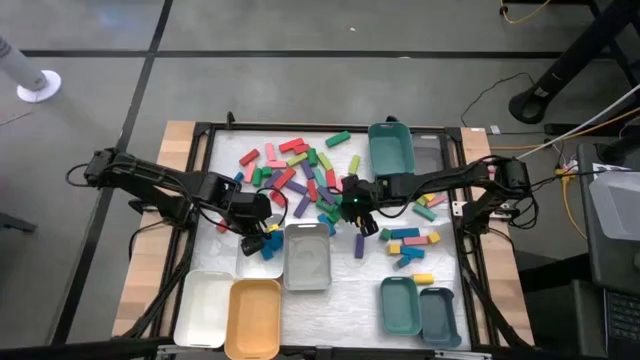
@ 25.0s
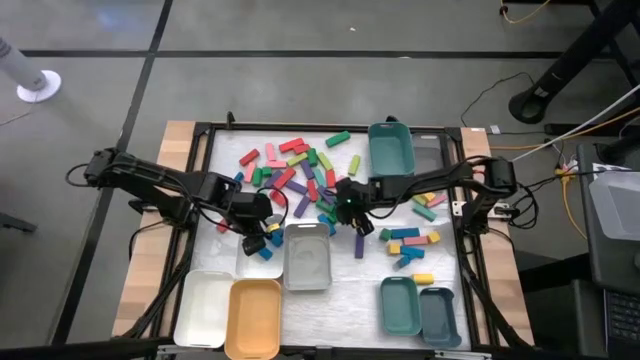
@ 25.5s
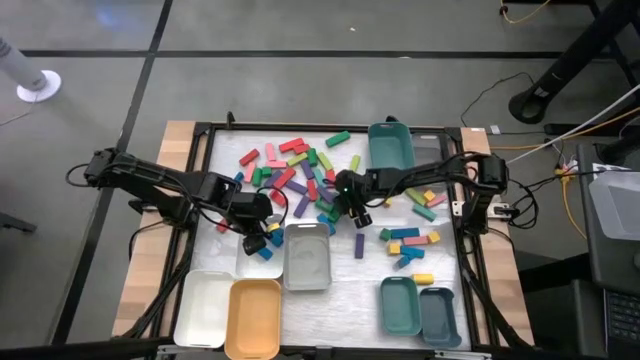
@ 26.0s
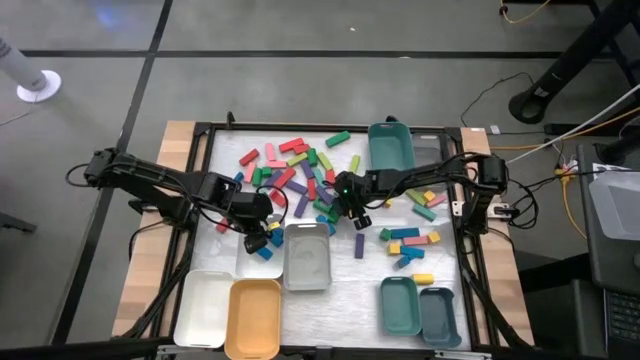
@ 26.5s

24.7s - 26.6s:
Task: Sort blocks
Put the green block into the top green bin

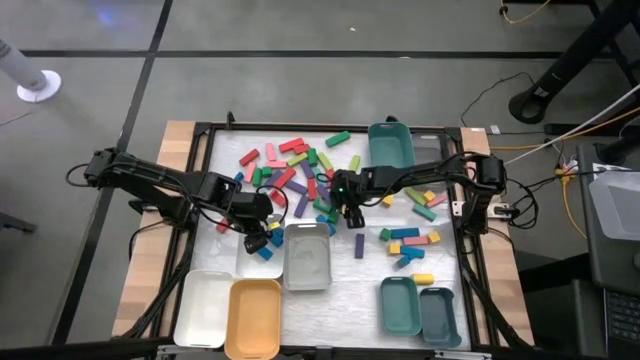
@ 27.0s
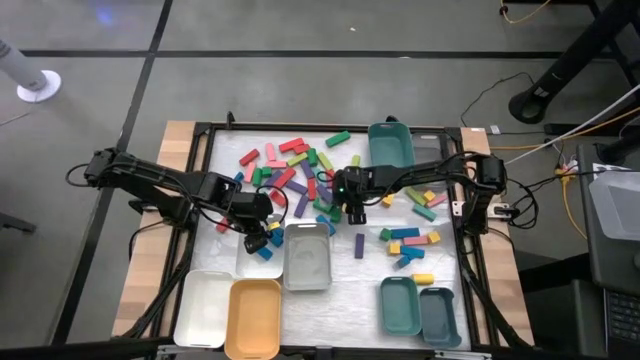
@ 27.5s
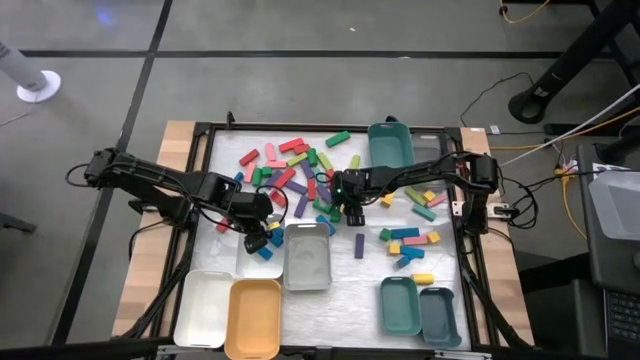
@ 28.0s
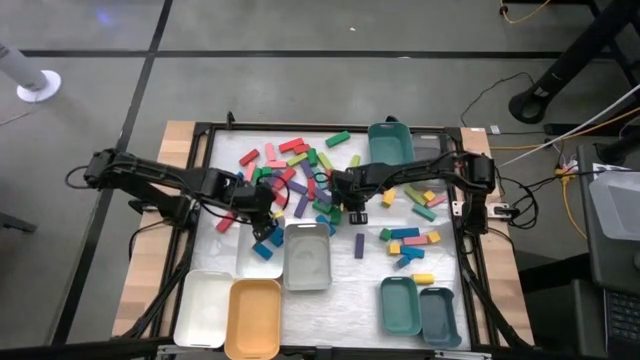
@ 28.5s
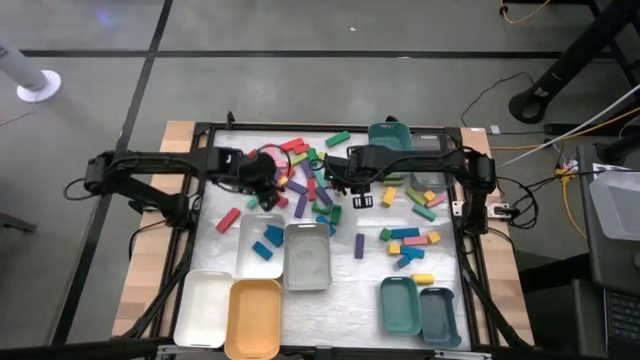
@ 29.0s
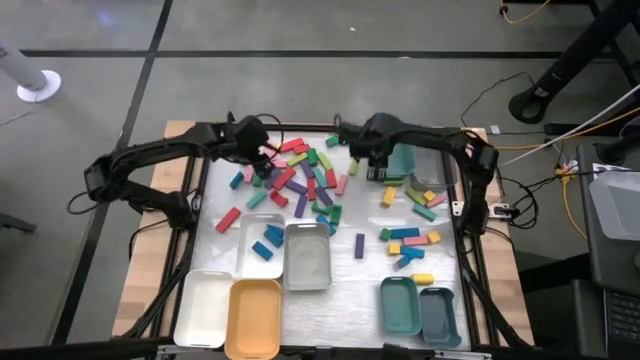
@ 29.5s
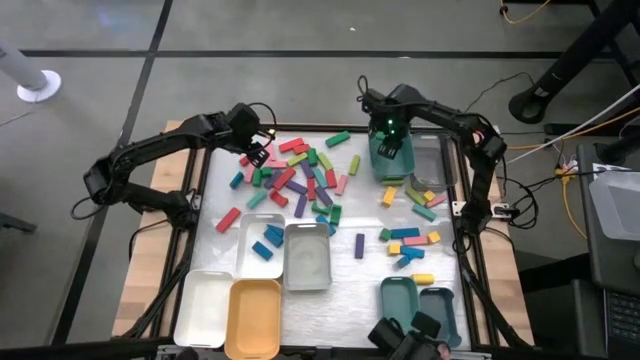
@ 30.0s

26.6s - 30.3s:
Put the green block into the top green bin

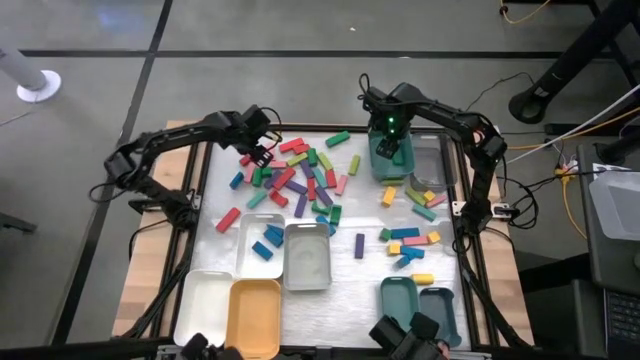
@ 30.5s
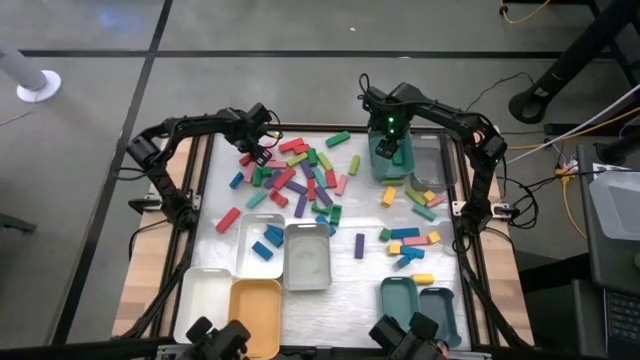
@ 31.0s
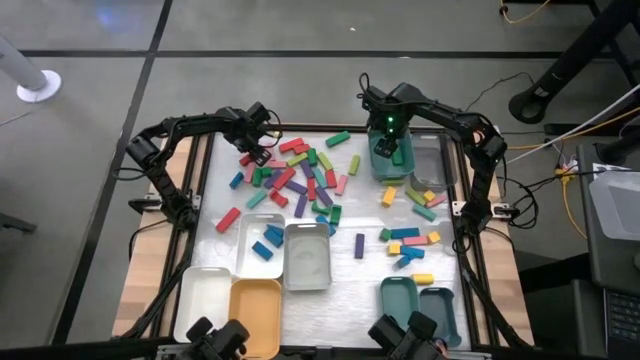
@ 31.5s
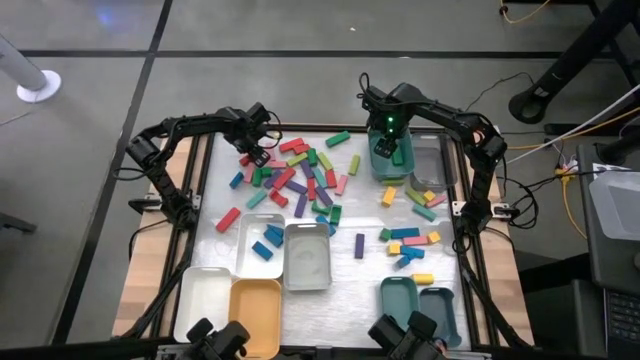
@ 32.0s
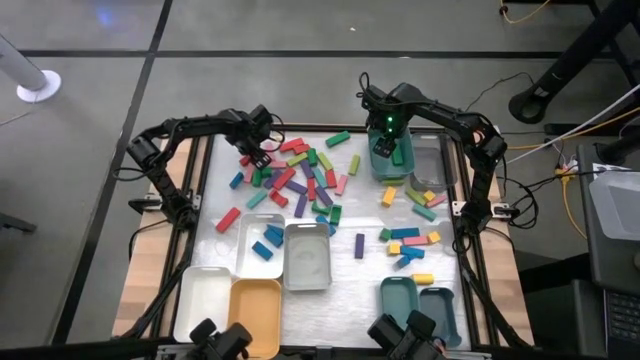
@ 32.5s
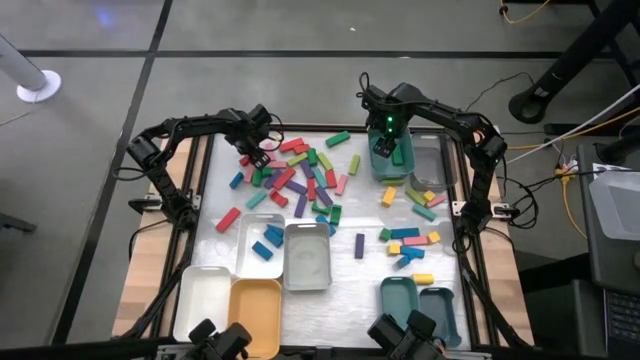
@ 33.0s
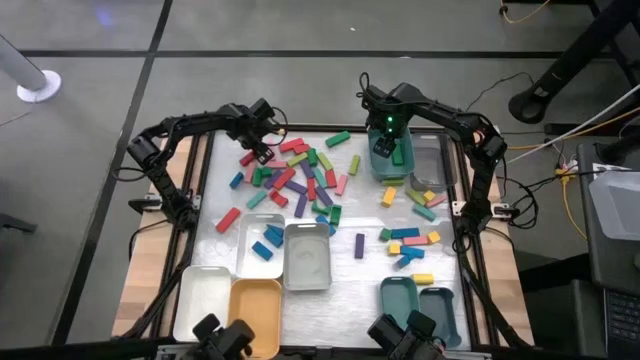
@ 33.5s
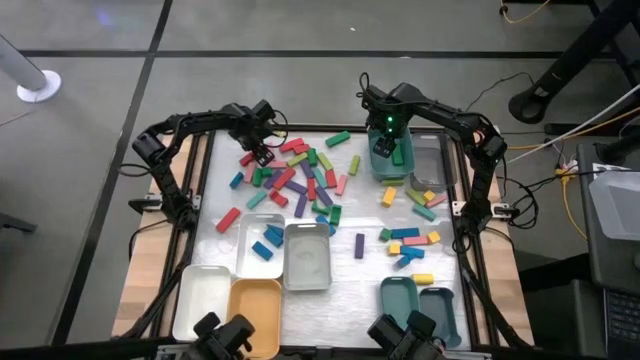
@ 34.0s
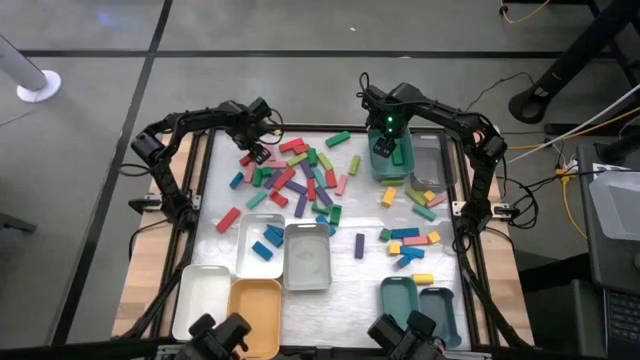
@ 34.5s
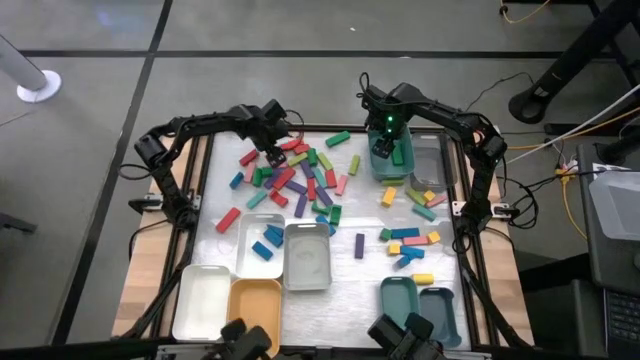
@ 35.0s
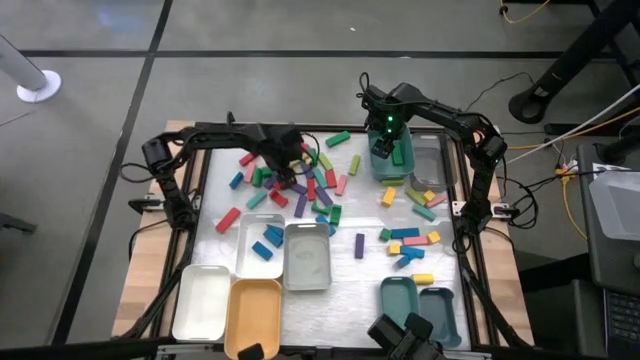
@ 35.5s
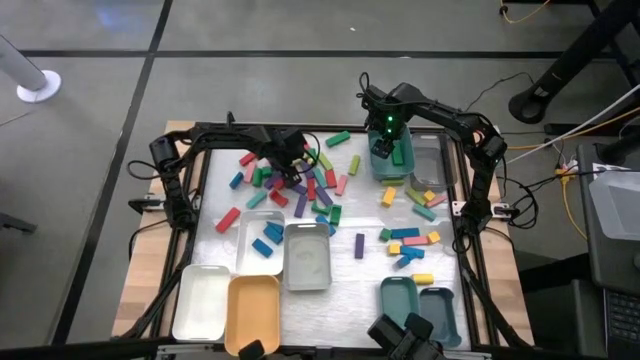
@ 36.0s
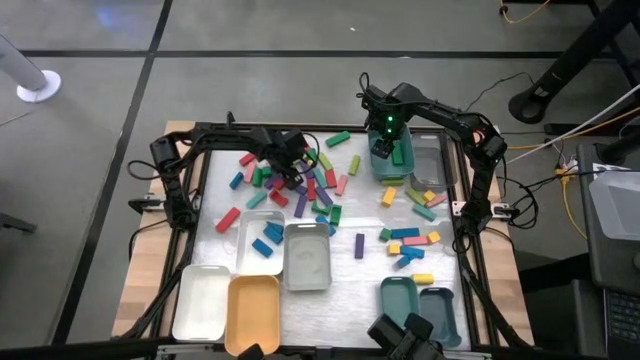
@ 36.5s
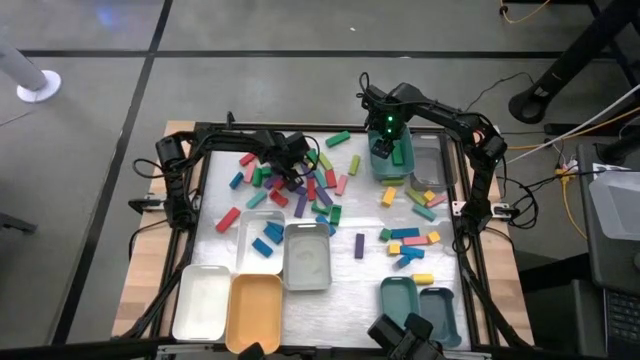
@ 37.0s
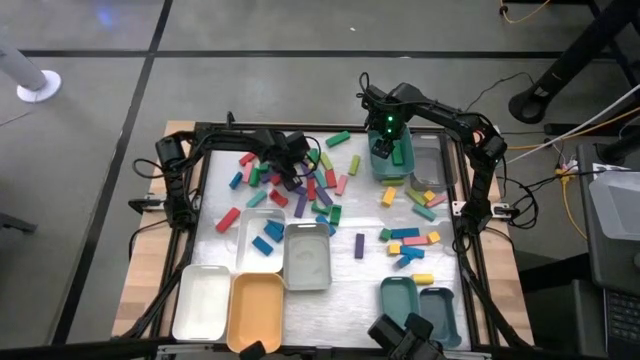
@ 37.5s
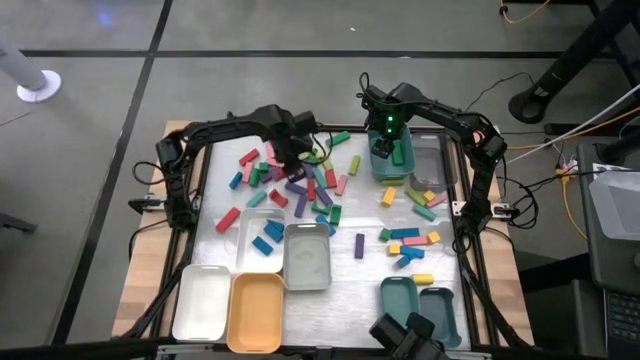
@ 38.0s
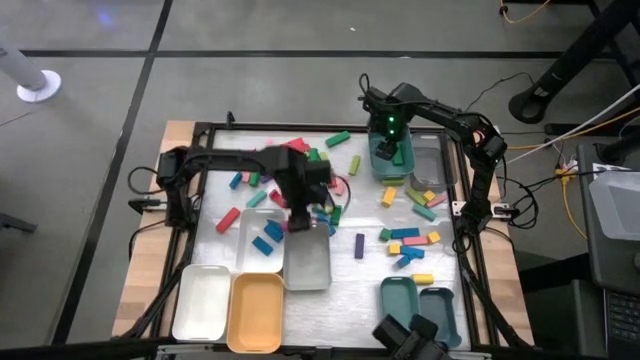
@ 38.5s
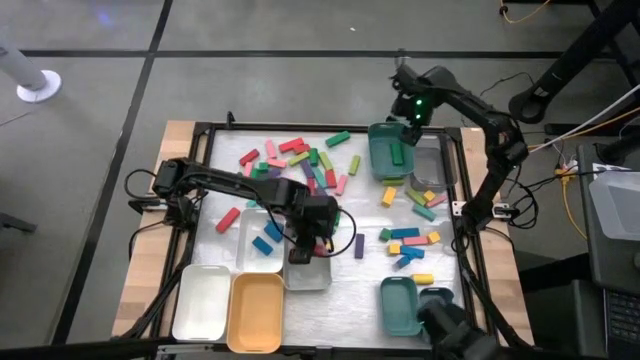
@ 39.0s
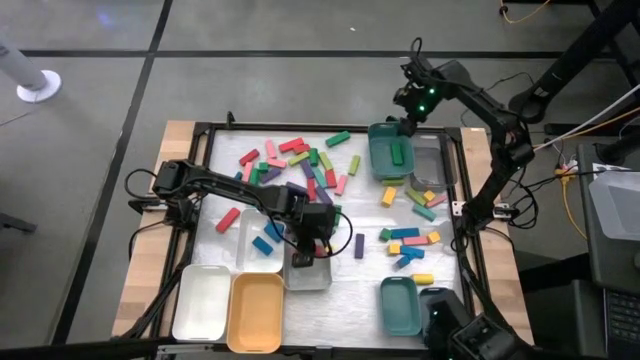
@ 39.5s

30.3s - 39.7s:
Put the red block into the gray bin

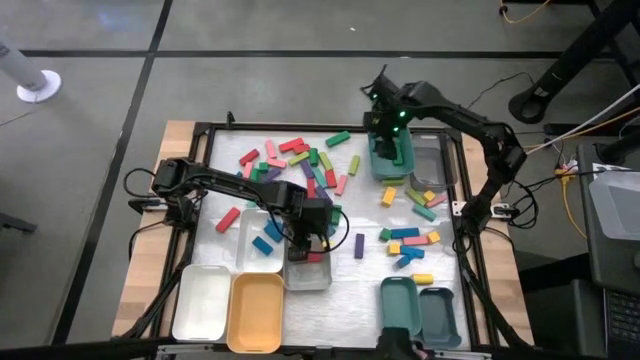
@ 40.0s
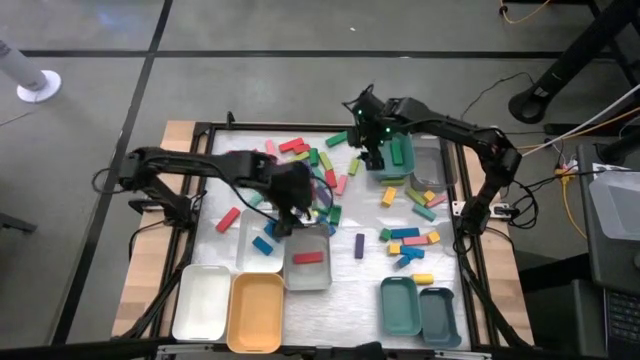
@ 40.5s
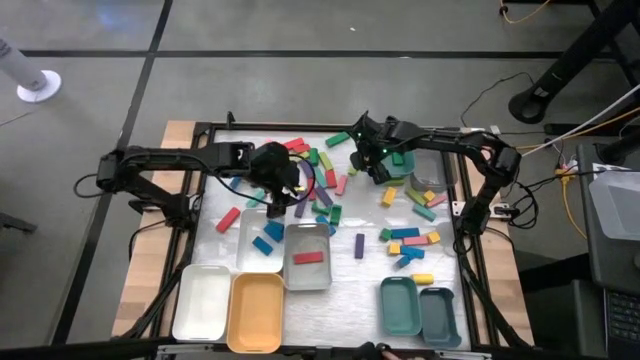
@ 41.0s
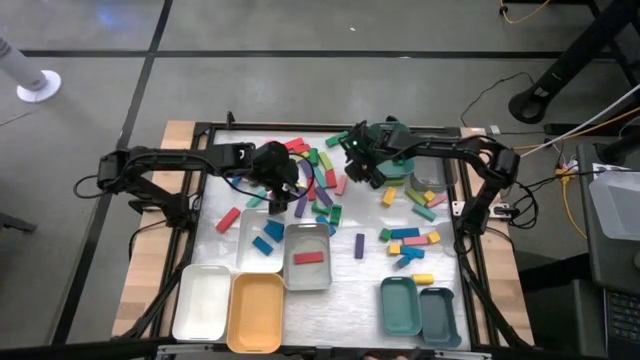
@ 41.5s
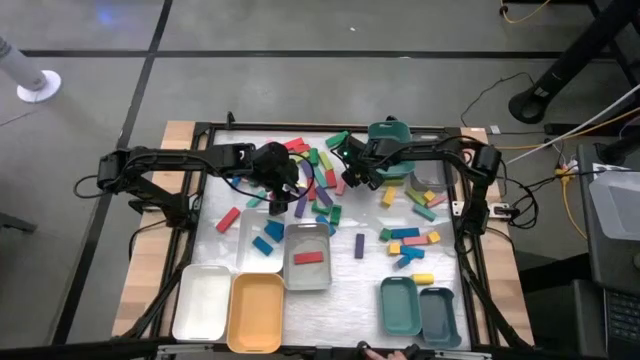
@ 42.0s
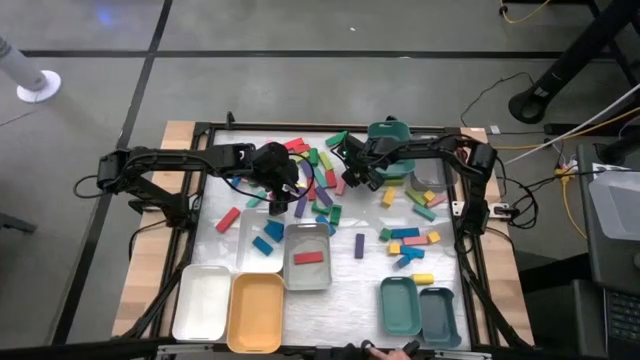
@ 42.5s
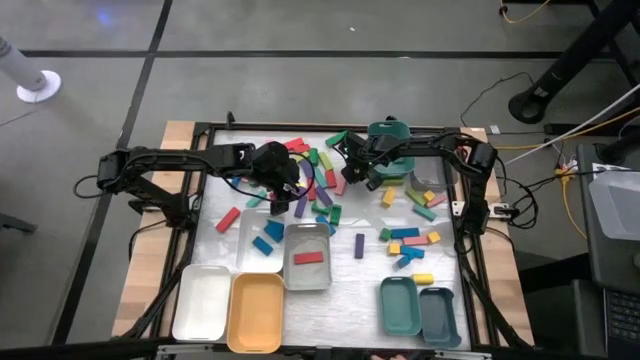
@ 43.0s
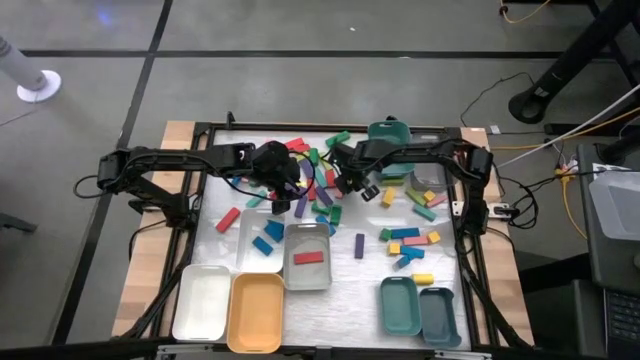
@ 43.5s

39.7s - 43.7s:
Put the light green block into the black bin

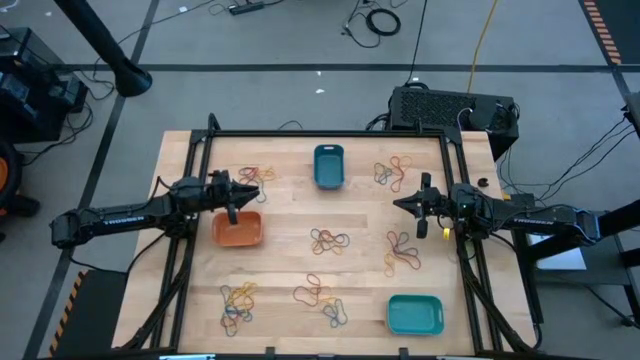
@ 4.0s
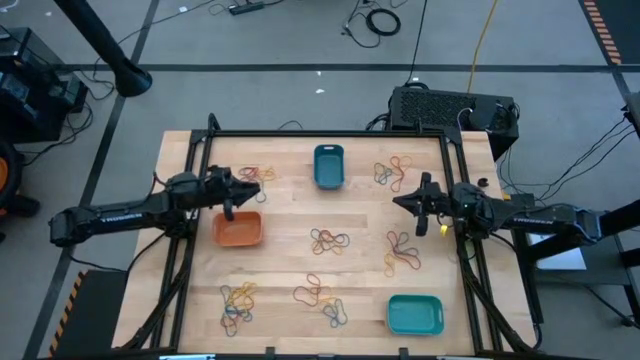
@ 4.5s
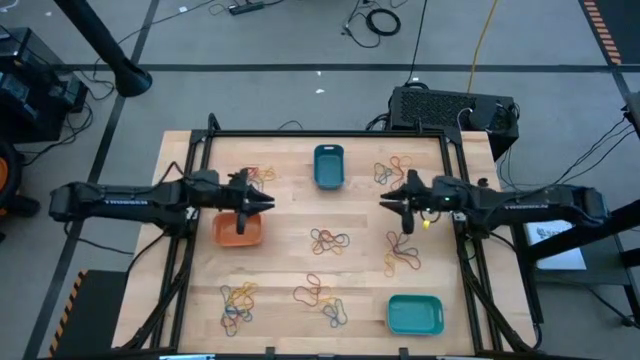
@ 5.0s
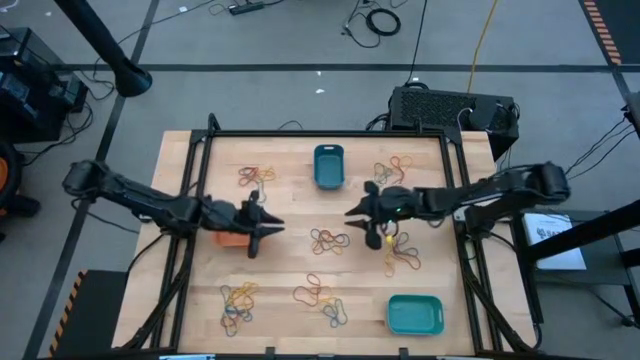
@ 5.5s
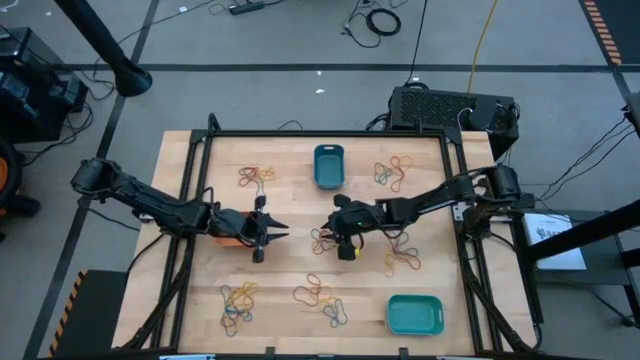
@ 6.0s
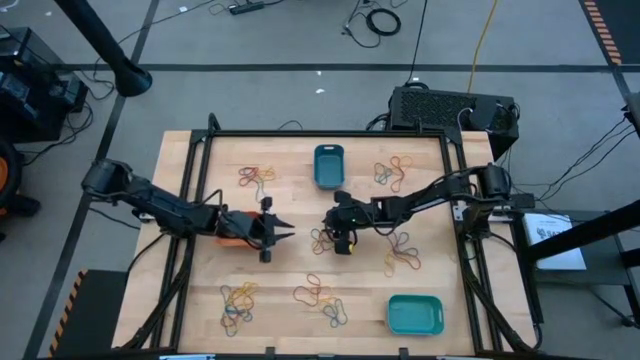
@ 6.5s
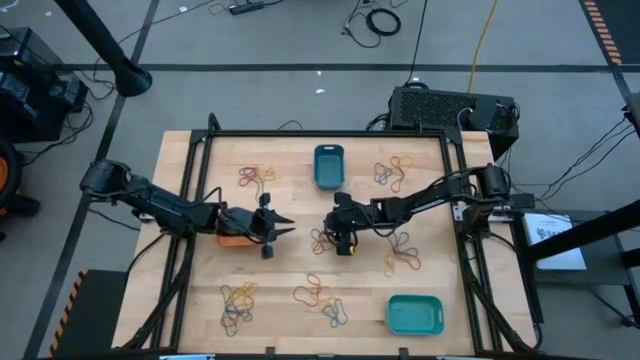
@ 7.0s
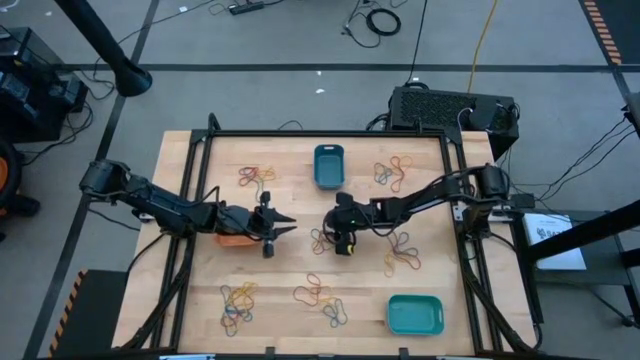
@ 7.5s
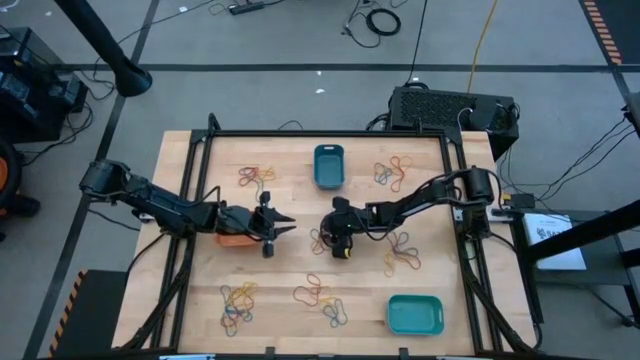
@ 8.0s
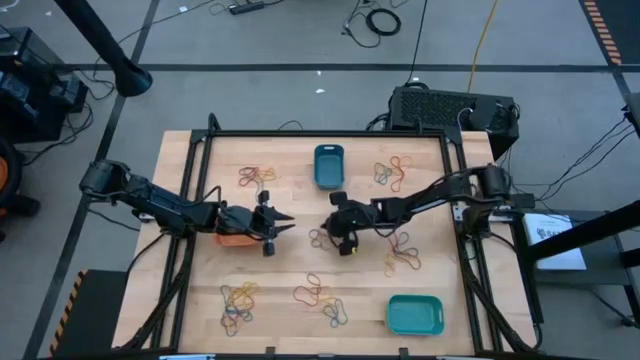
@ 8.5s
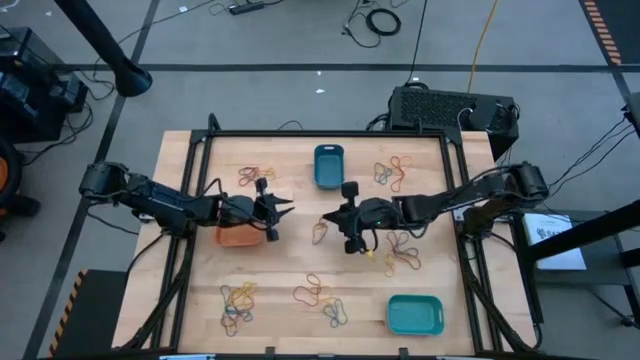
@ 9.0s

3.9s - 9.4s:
Task: Sort rubber bands into baskets
Put the center red rubber band into the blue bin
